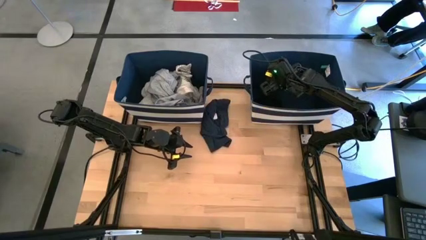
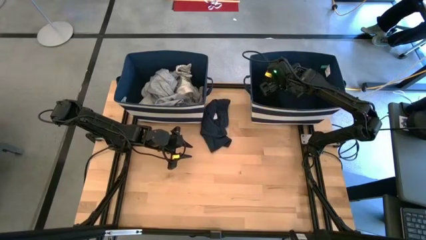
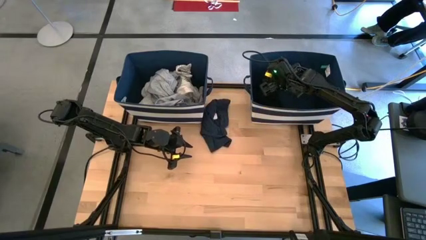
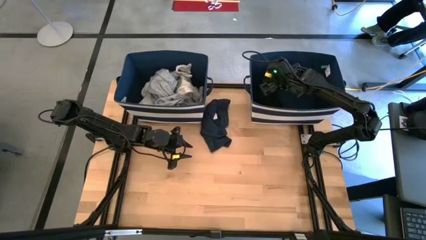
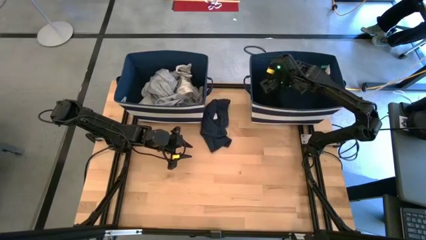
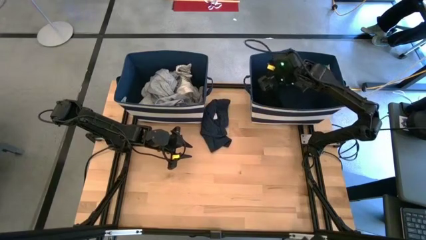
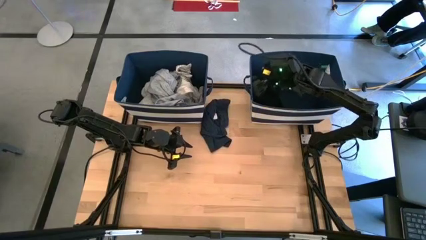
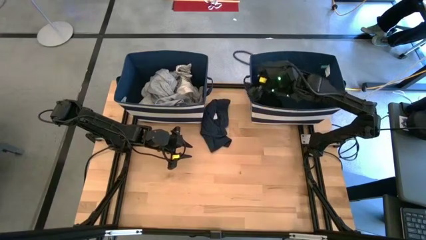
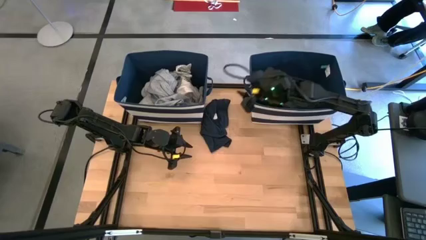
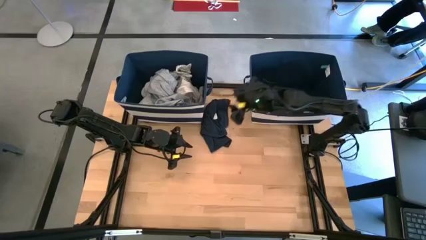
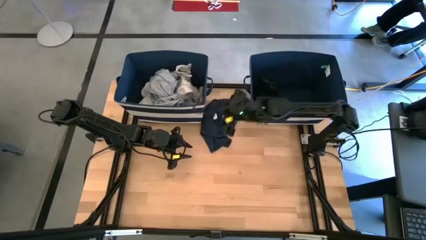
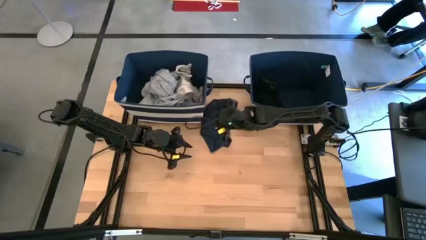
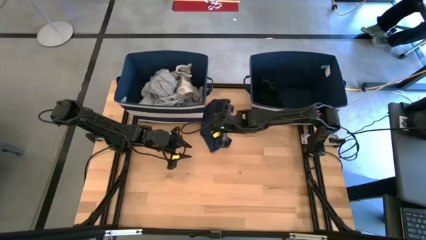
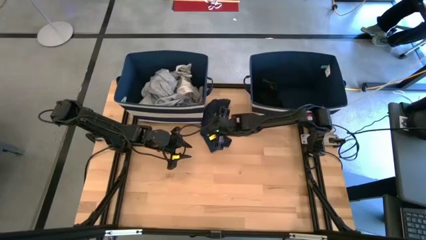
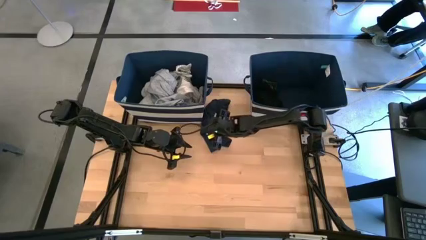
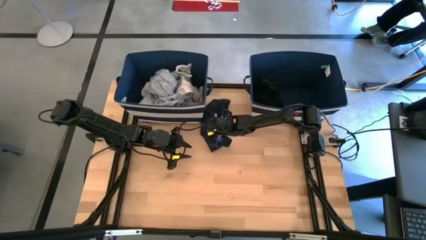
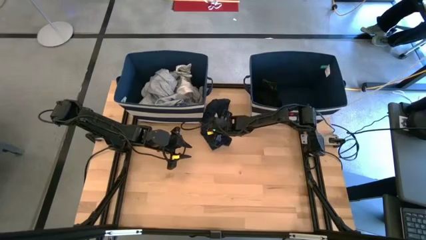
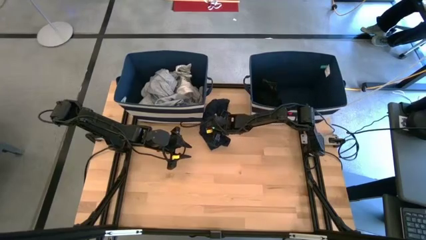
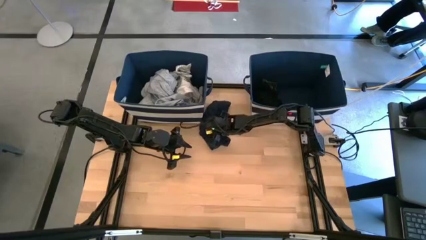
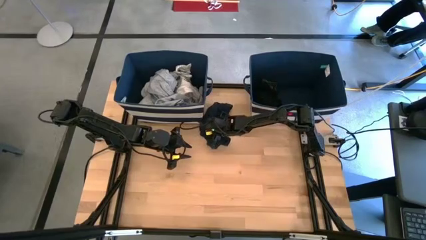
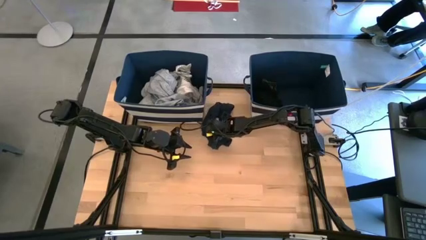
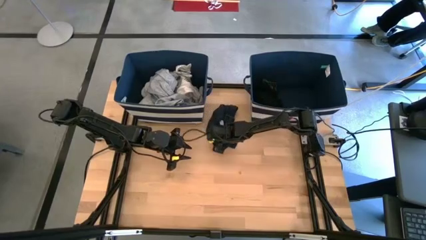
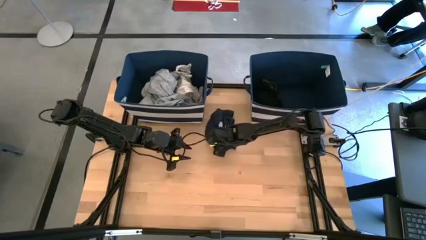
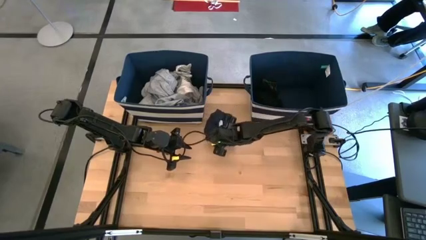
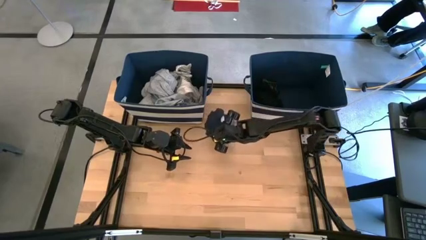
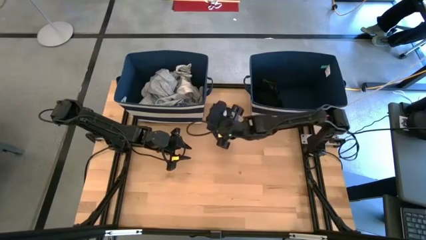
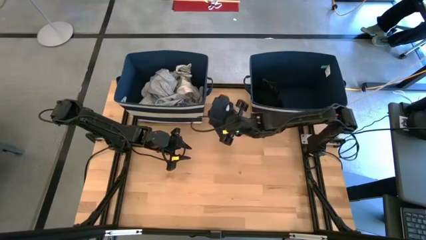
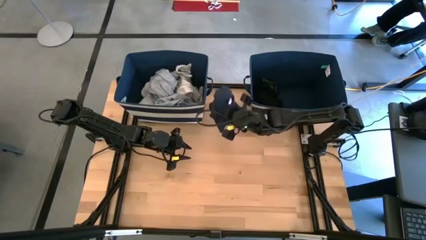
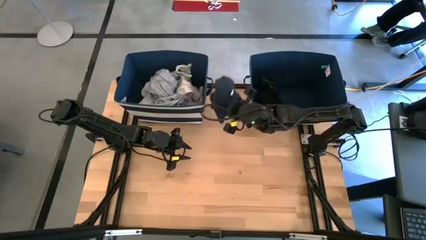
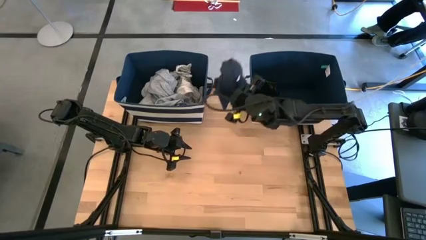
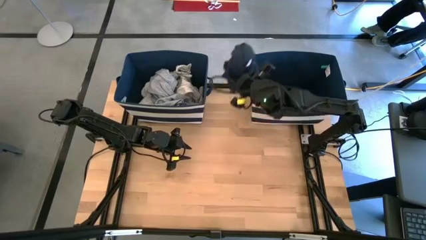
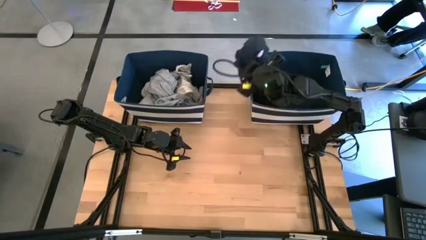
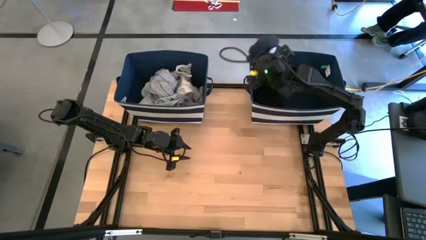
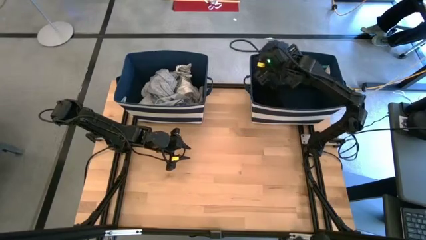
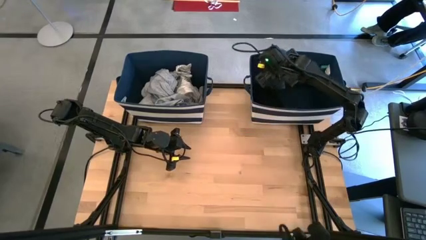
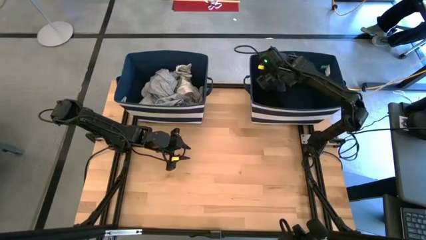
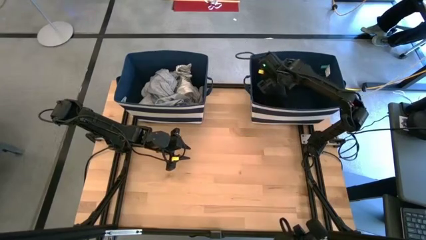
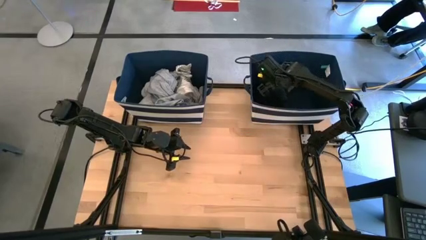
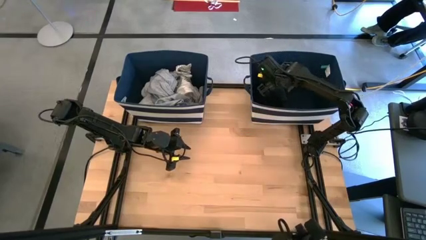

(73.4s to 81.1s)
Task: Sort clothes
Put the dark blue shorts into the right blue bin

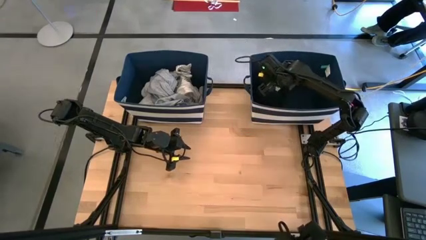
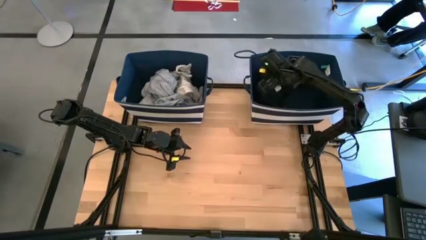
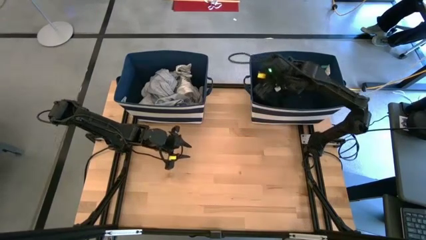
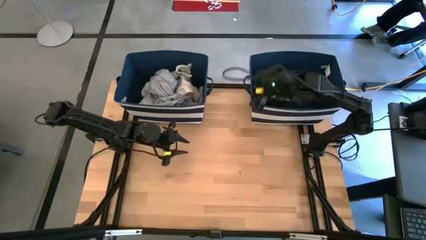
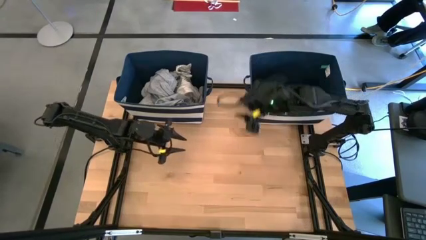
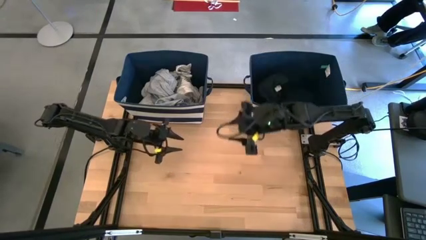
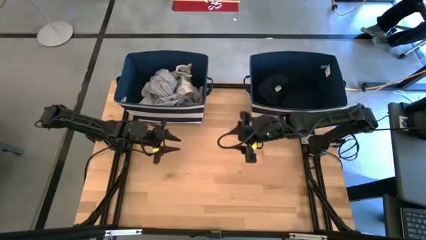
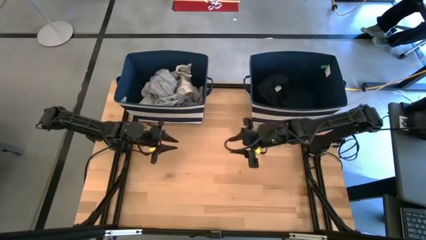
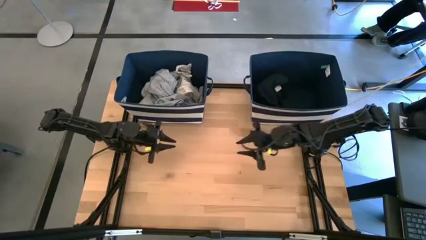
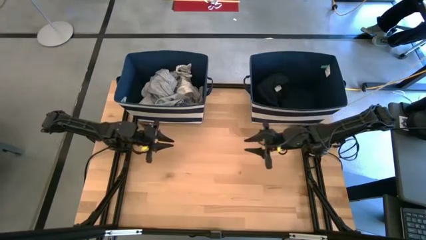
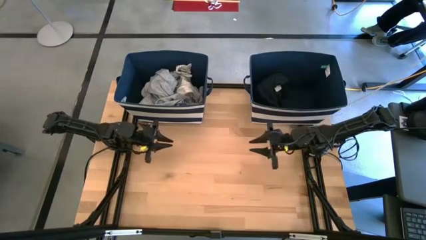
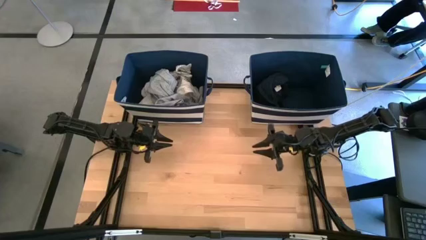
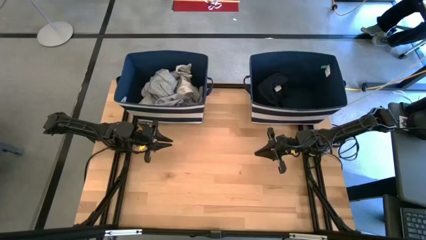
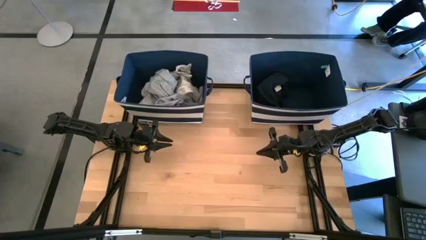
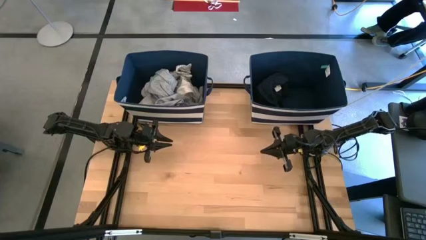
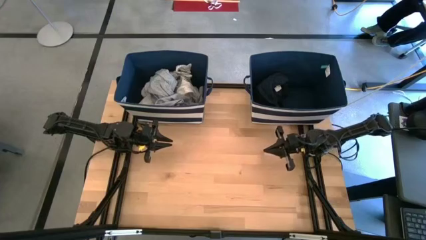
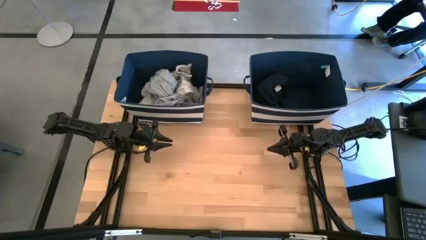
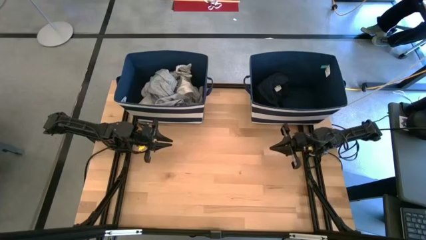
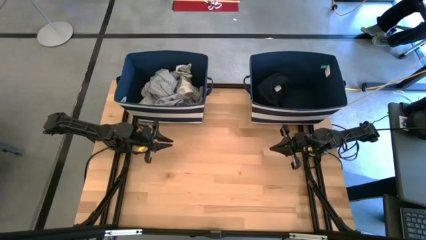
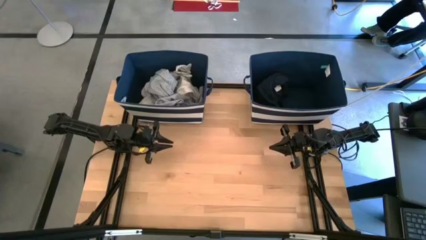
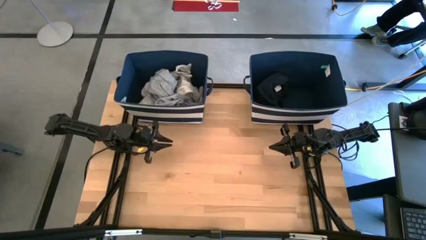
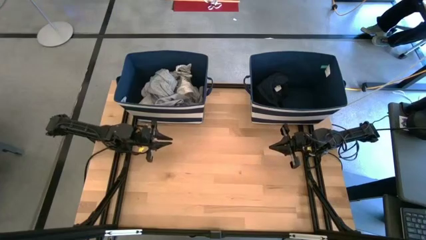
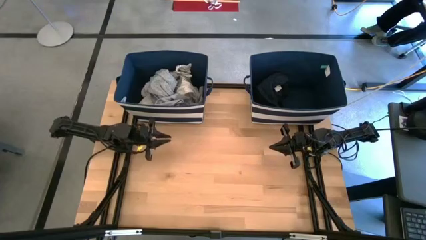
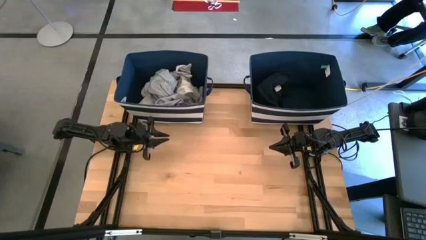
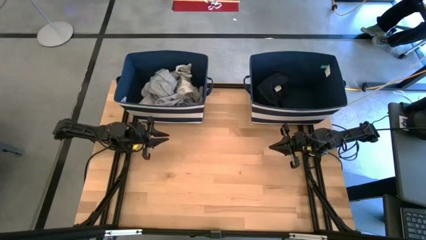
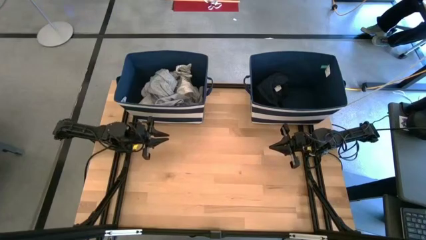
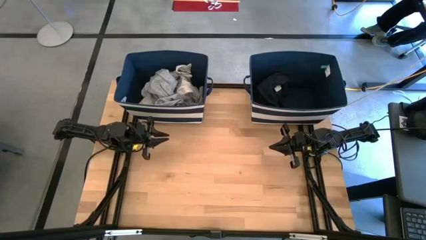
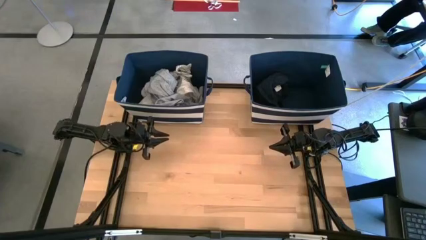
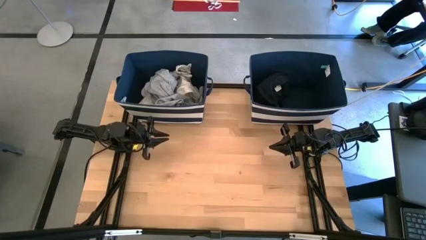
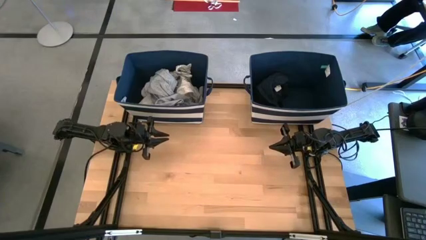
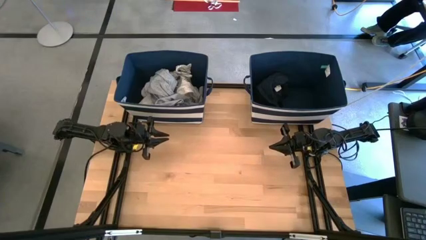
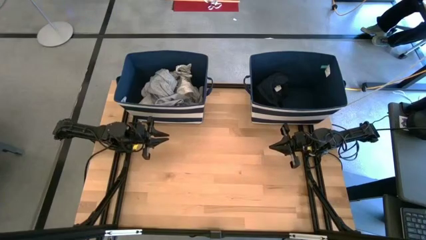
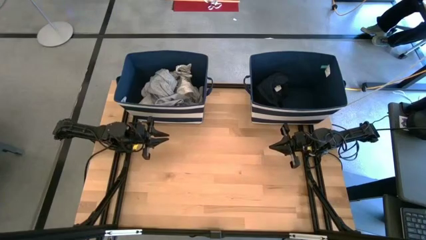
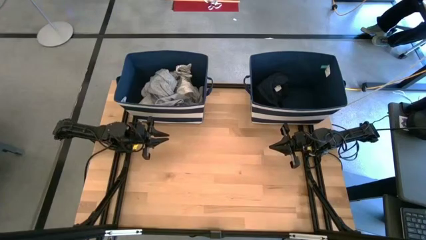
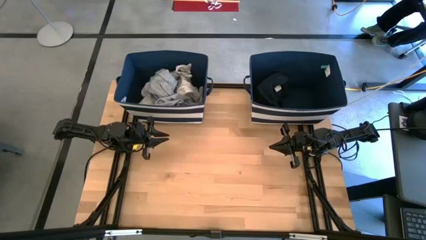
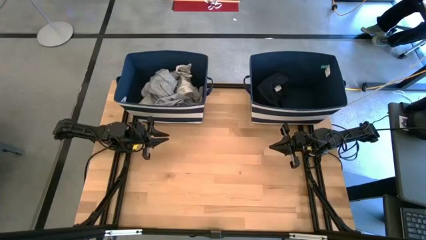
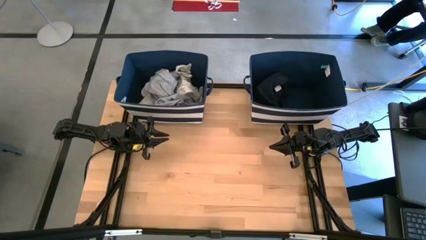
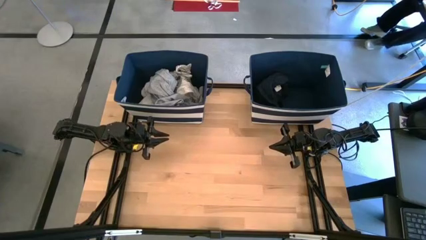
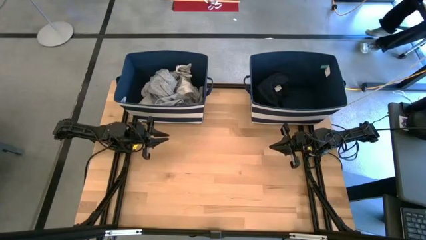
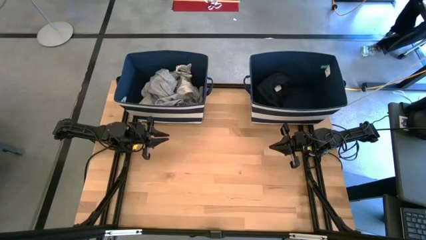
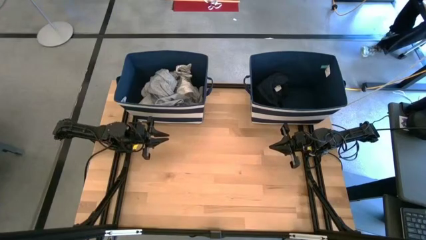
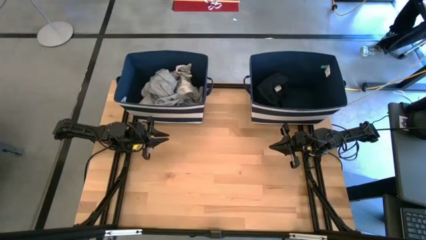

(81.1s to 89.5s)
Return to Home Position
